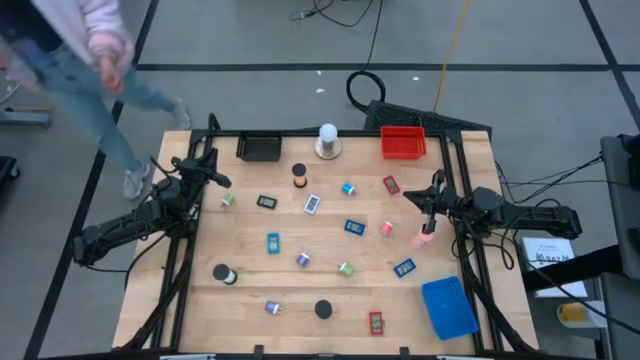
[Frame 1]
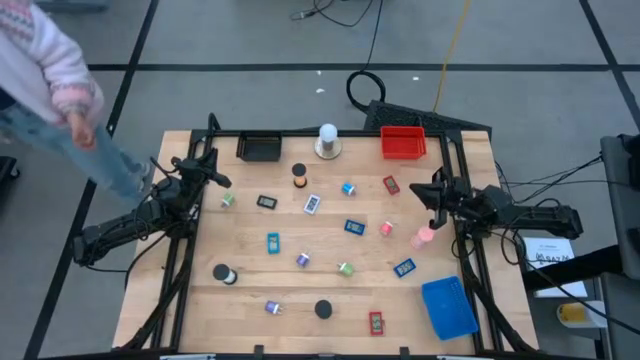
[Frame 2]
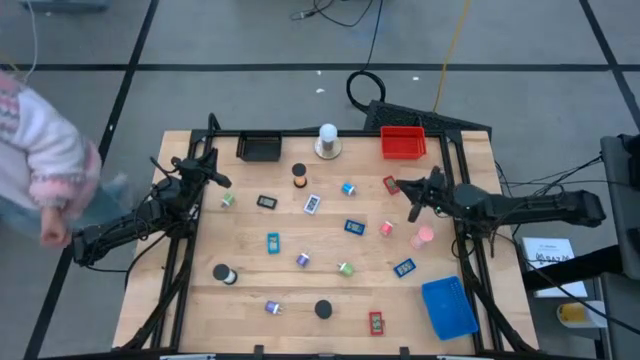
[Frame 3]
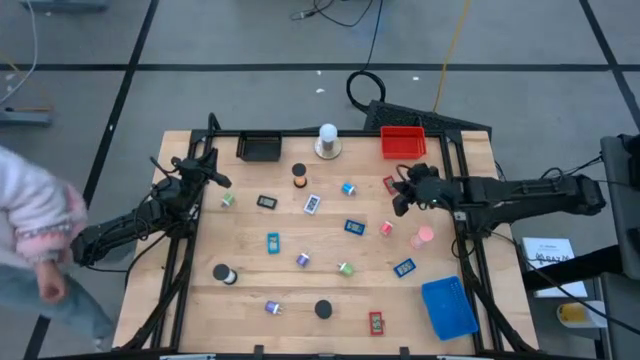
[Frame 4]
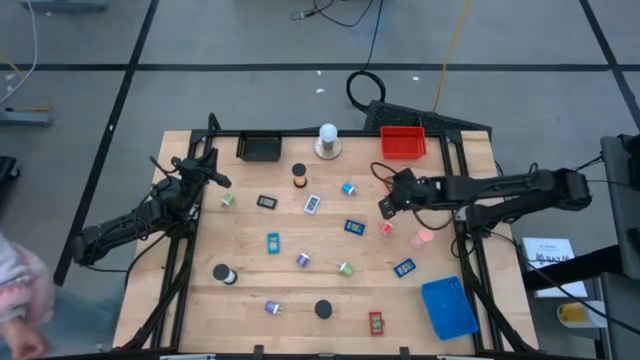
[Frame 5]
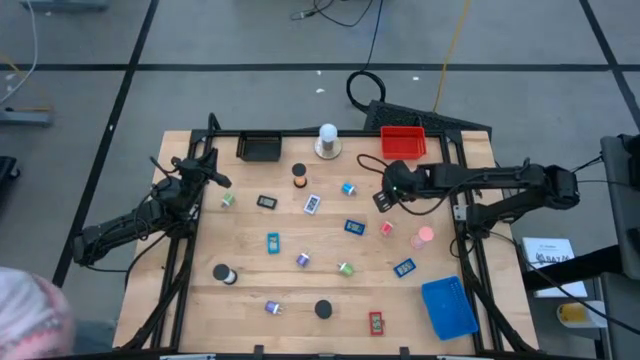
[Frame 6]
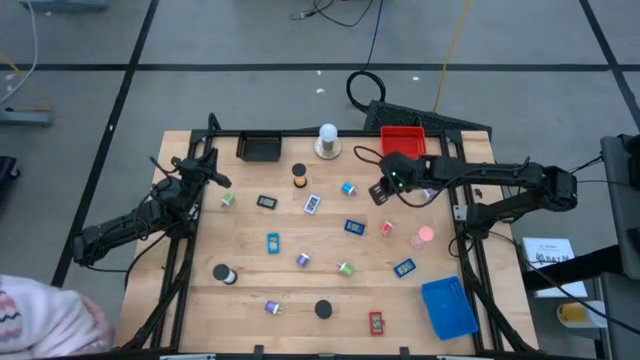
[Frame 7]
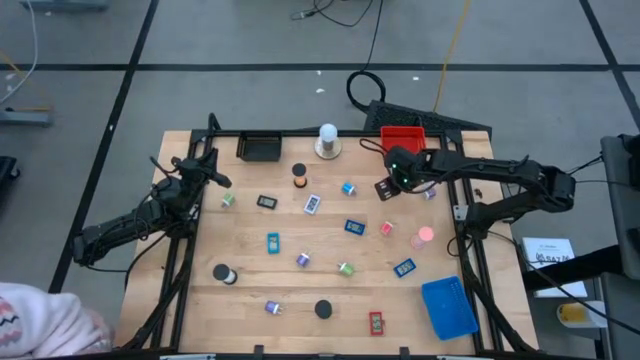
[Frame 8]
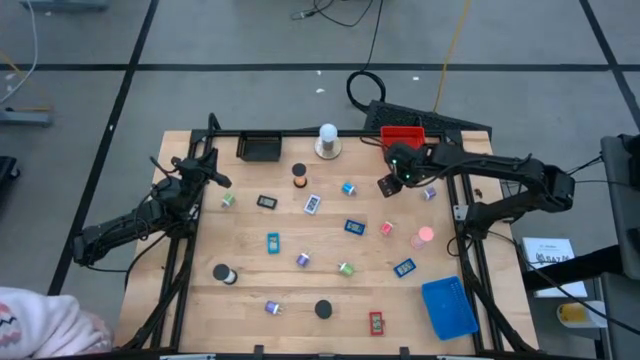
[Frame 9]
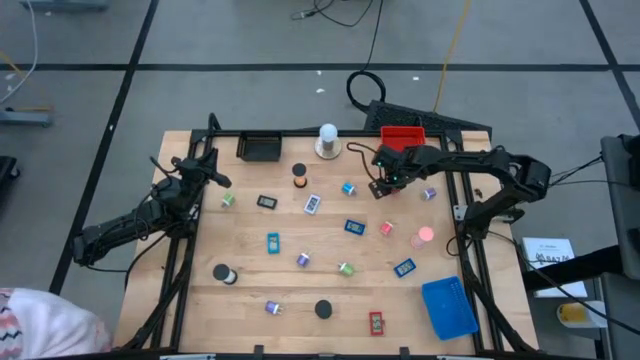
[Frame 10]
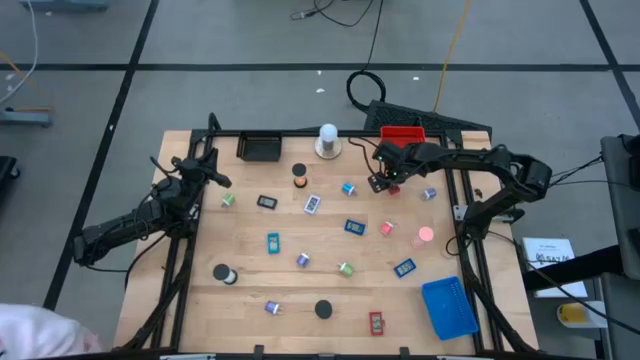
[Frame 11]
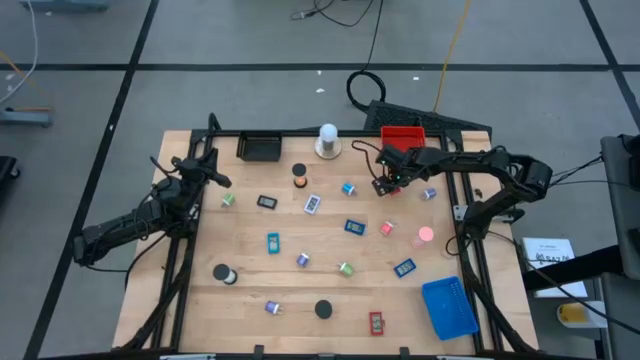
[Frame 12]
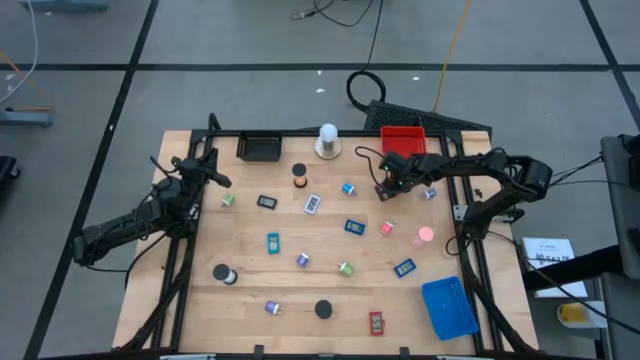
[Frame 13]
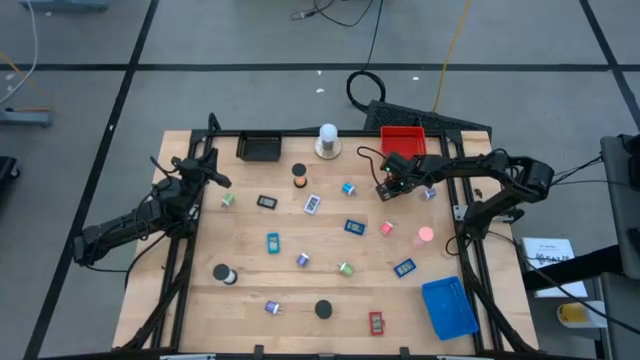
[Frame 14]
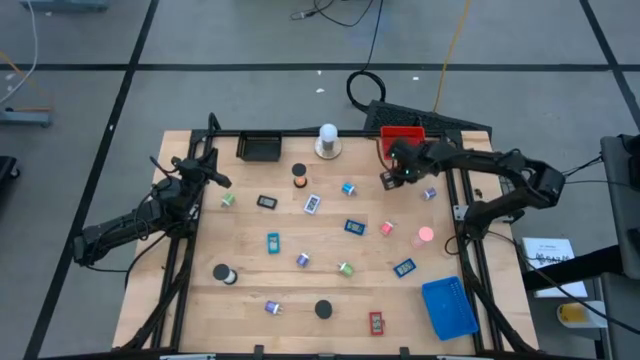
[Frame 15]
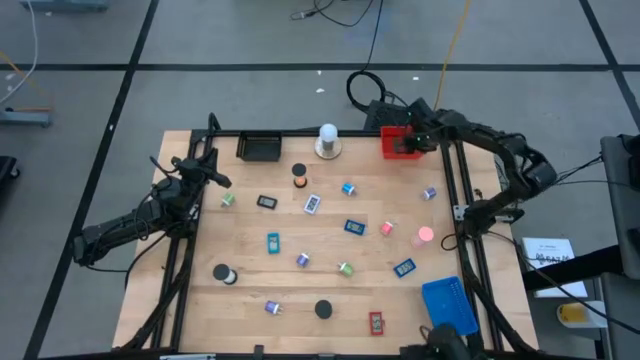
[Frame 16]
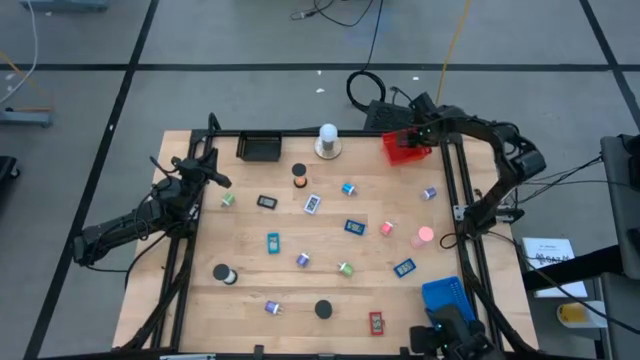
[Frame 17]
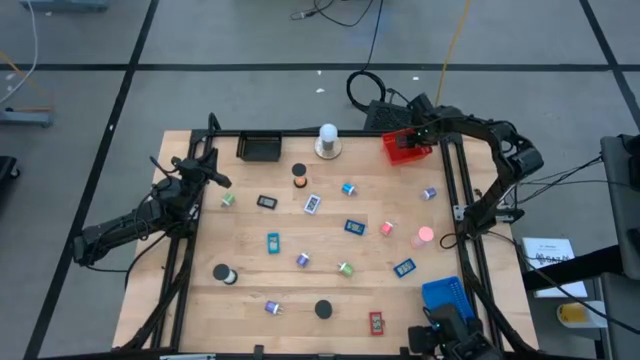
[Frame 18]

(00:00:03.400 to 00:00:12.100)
Task: Pick & Place Office items
Put the red digital timer into the red bin

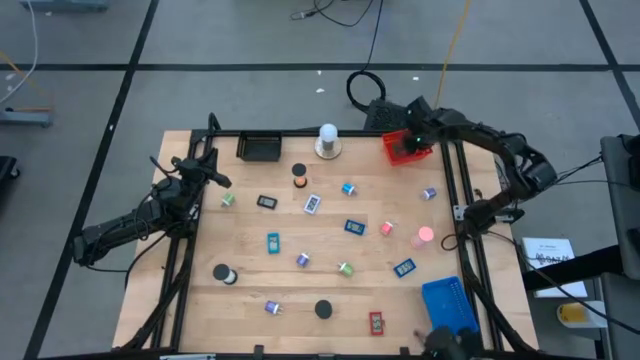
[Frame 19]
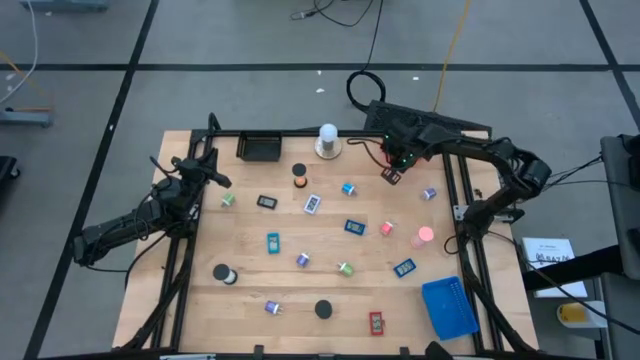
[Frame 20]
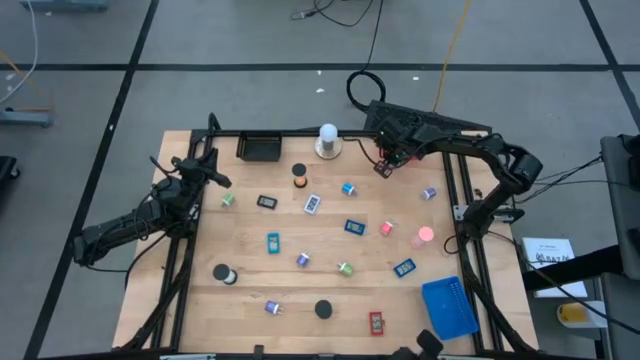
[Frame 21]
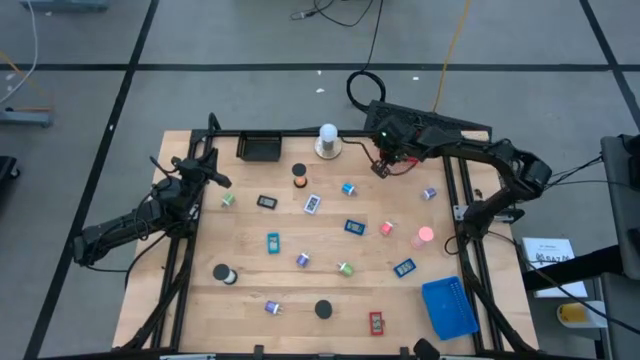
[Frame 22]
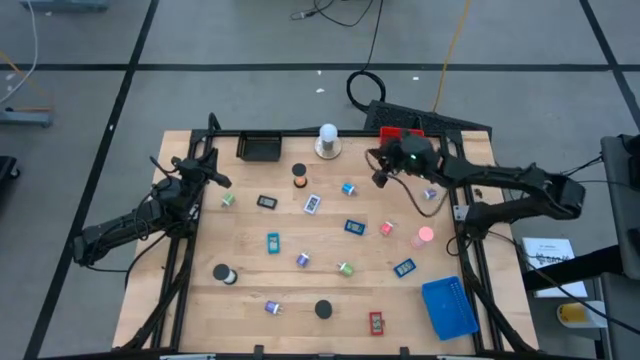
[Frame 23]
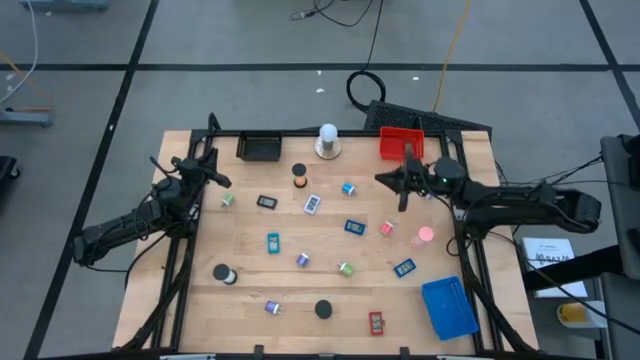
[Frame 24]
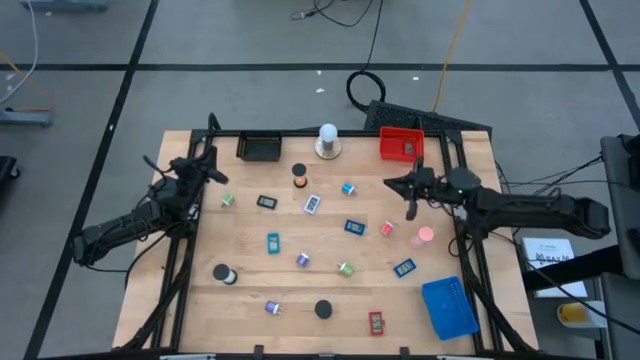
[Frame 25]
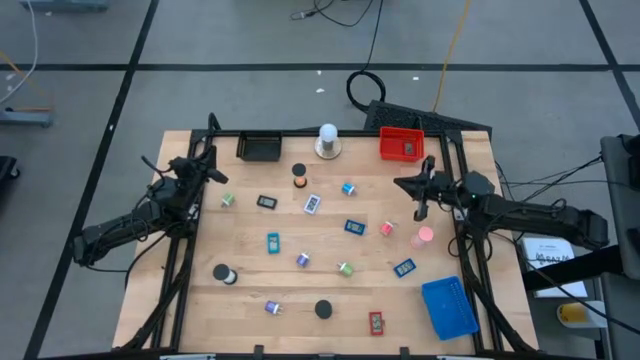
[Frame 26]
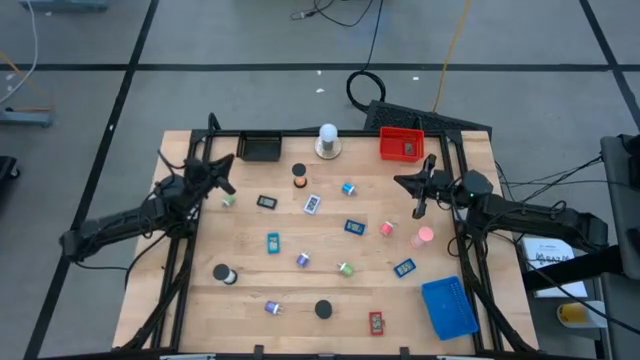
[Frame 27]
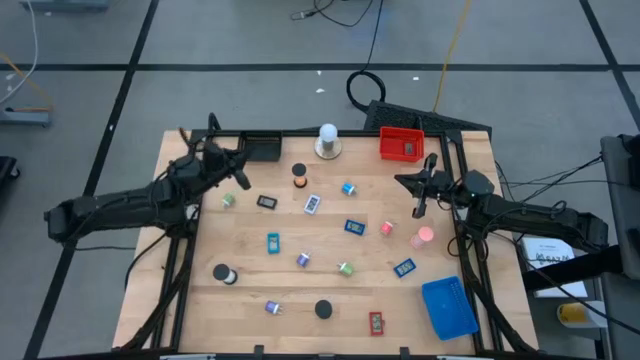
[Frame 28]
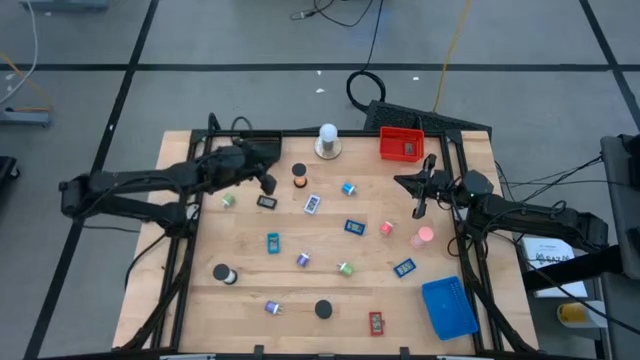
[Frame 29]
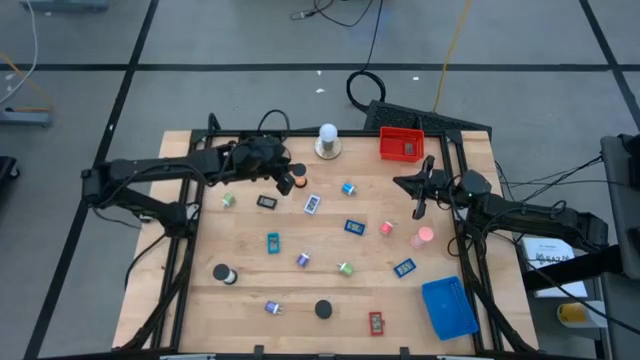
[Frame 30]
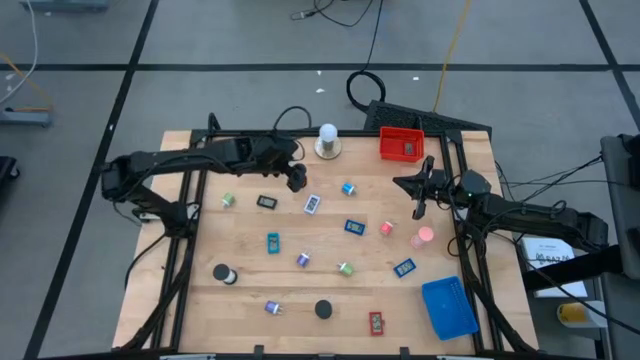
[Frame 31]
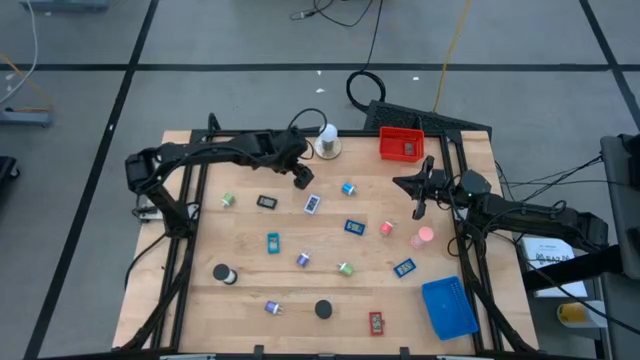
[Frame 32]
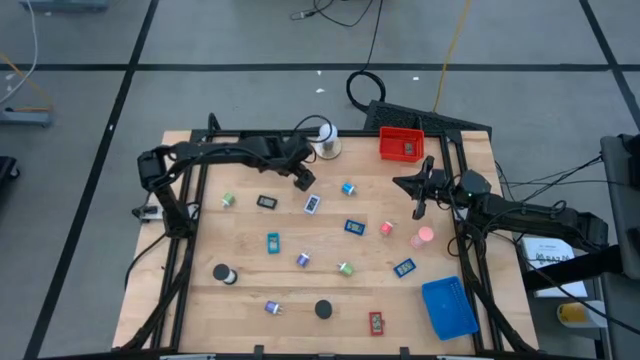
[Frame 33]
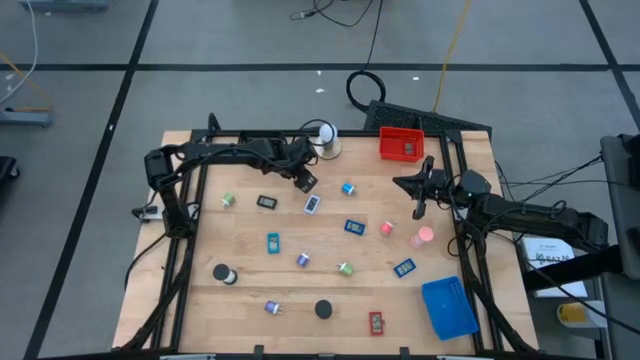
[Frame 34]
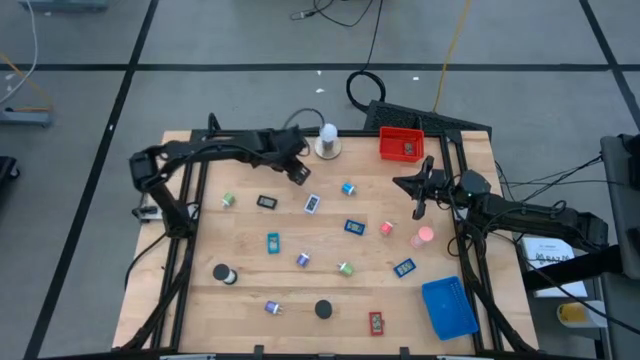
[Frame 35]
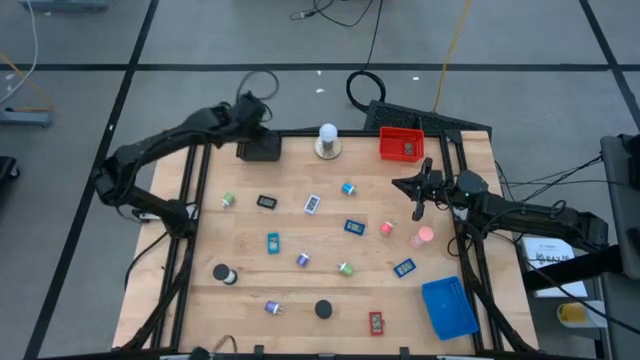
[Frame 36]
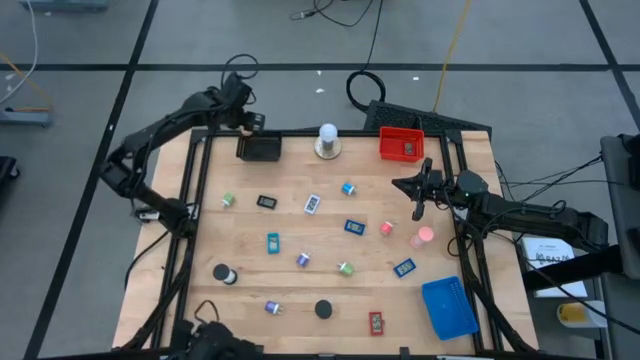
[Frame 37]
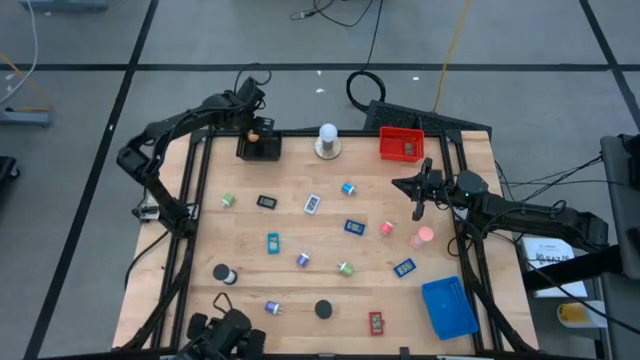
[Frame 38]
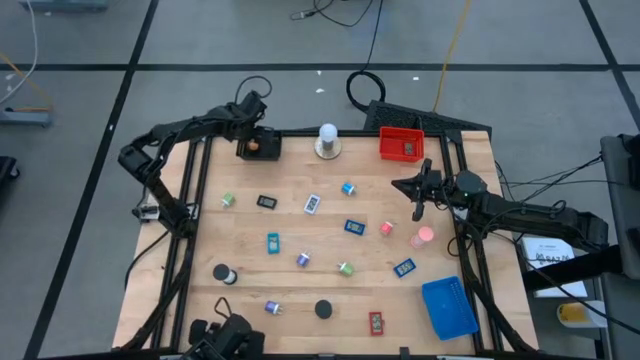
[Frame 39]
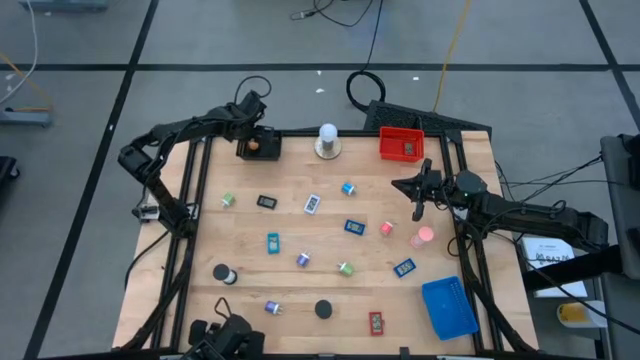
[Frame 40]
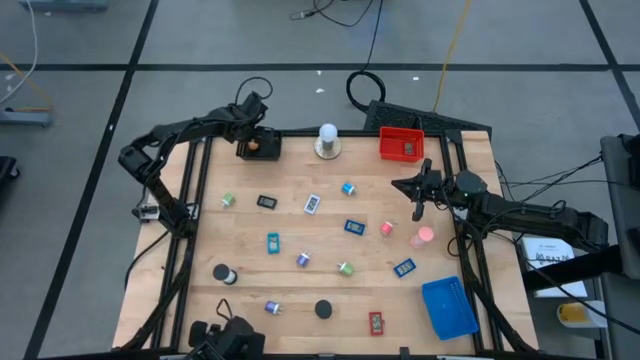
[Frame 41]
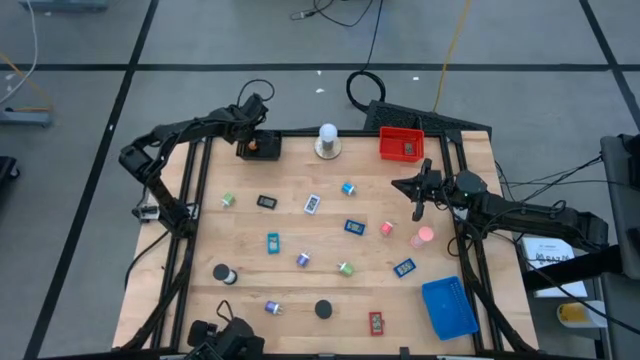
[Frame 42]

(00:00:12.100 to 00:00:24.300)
Put the orange hourglass into the black bin
